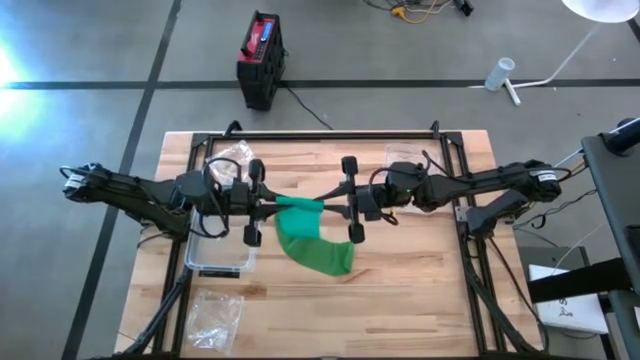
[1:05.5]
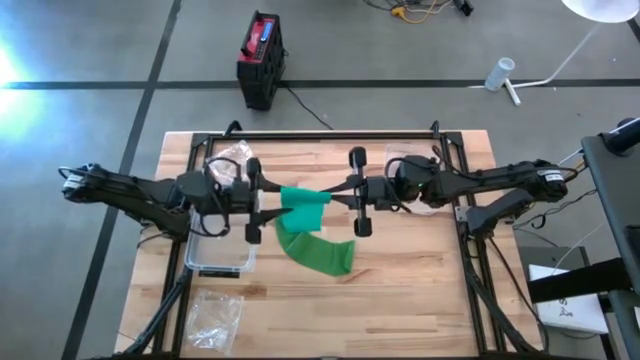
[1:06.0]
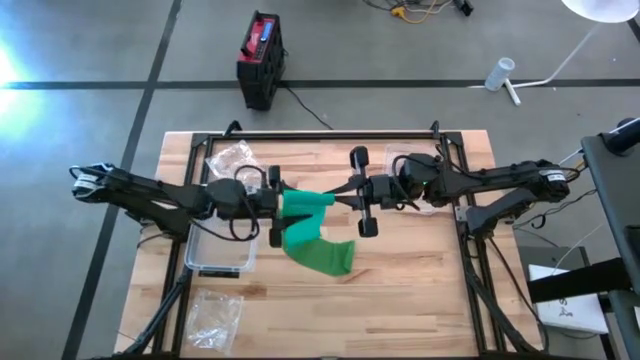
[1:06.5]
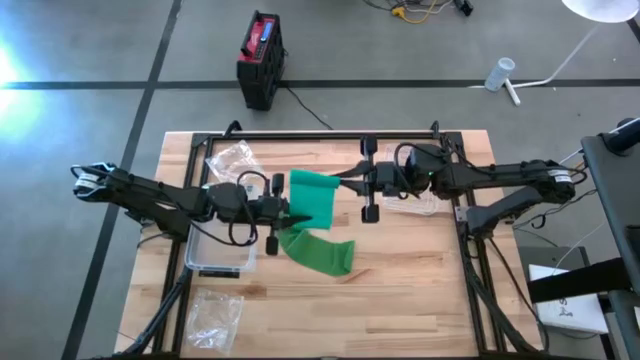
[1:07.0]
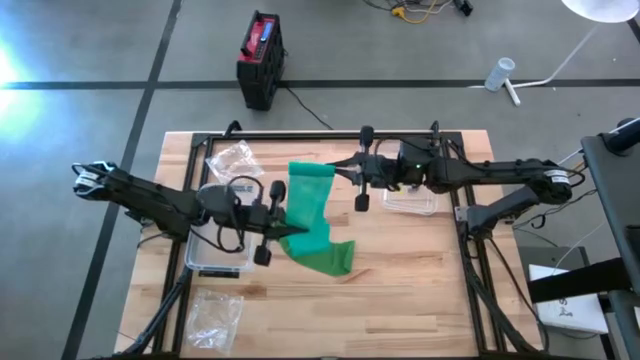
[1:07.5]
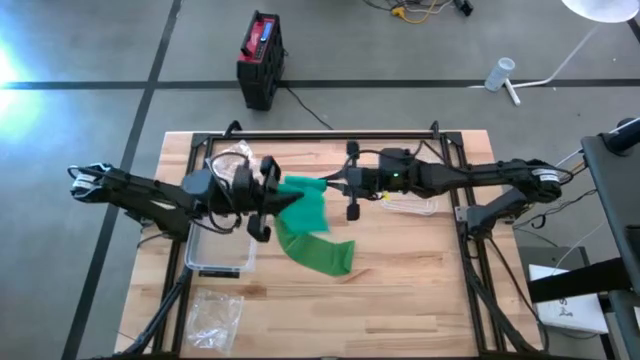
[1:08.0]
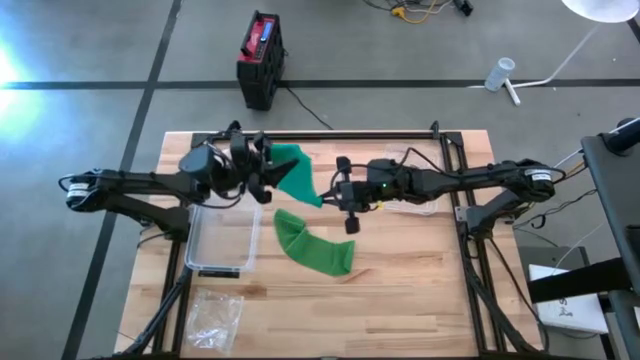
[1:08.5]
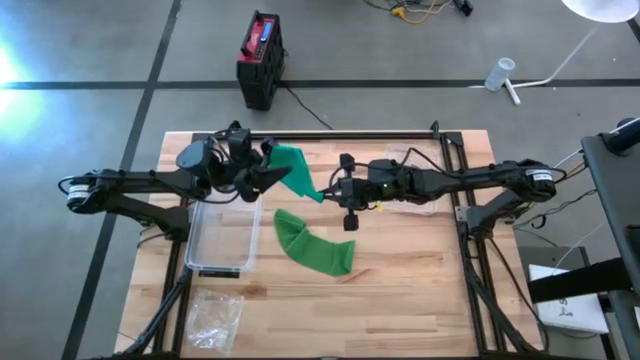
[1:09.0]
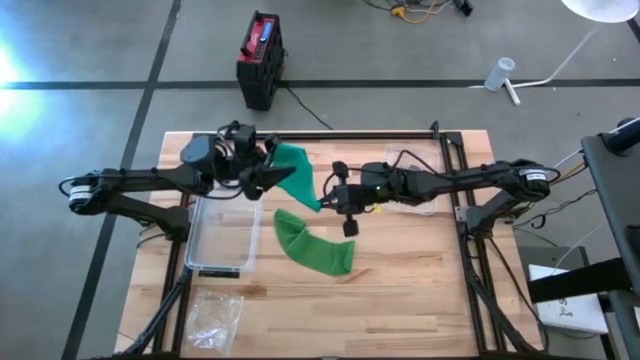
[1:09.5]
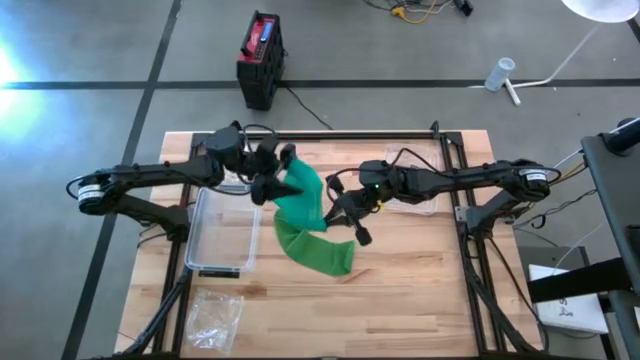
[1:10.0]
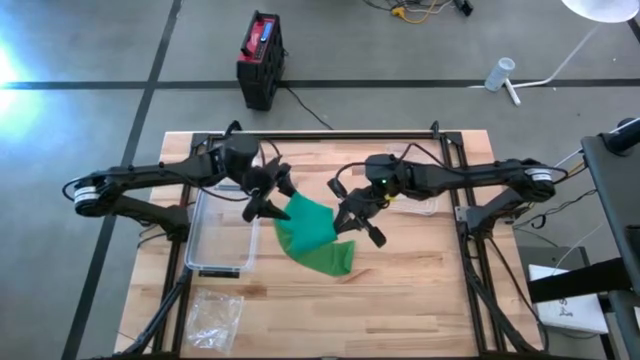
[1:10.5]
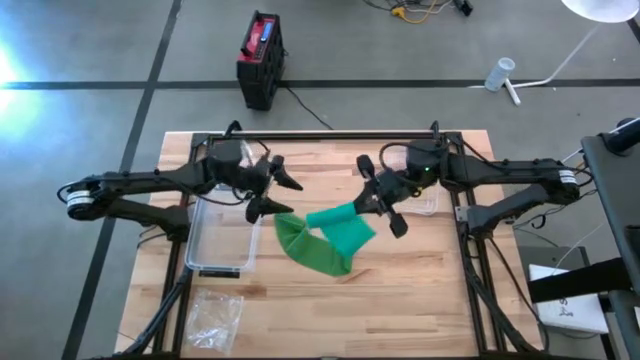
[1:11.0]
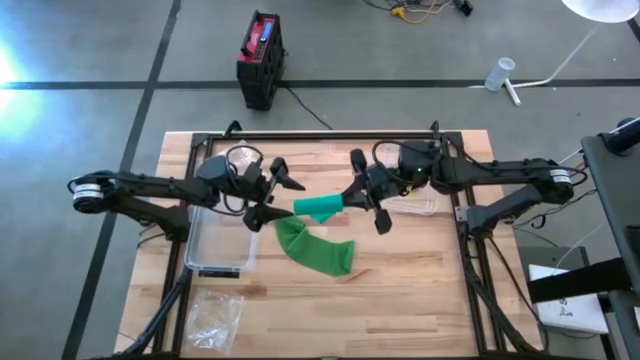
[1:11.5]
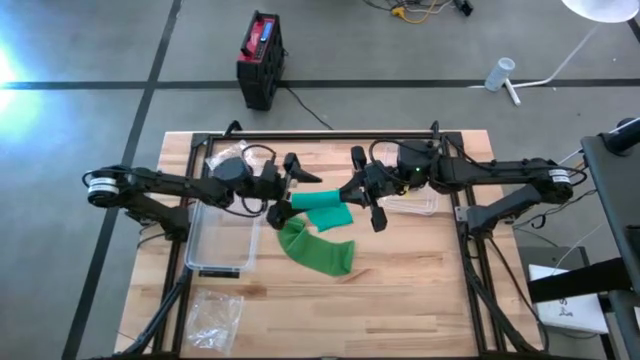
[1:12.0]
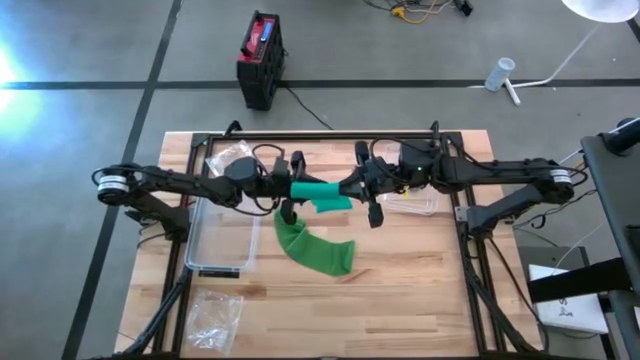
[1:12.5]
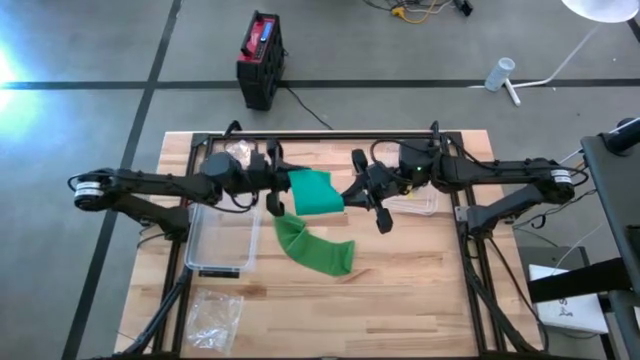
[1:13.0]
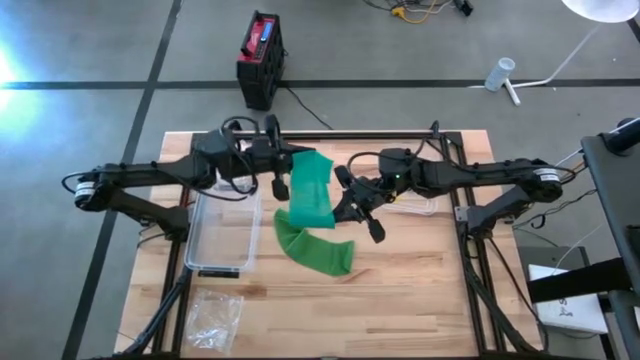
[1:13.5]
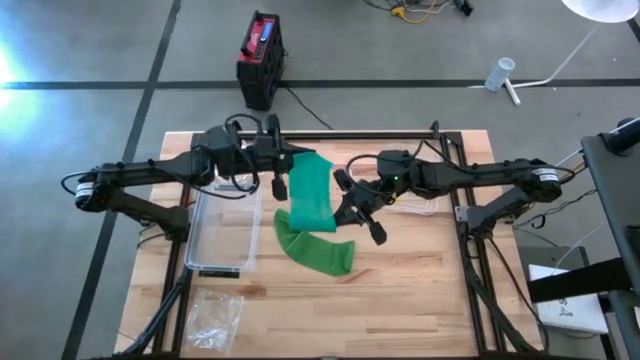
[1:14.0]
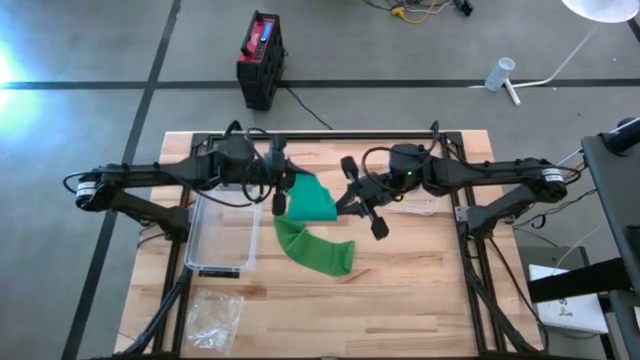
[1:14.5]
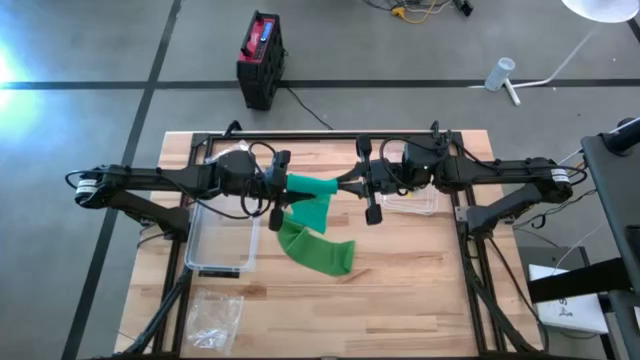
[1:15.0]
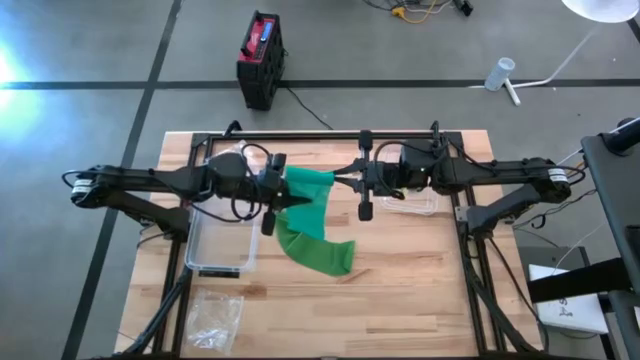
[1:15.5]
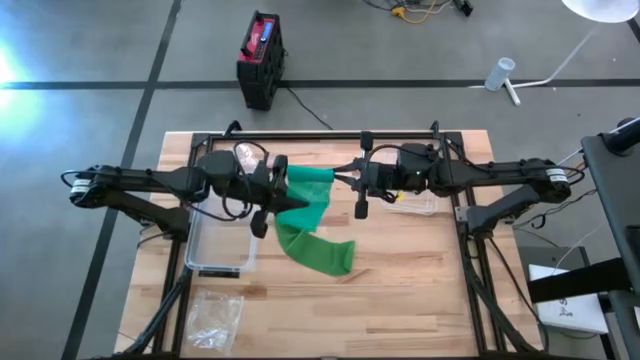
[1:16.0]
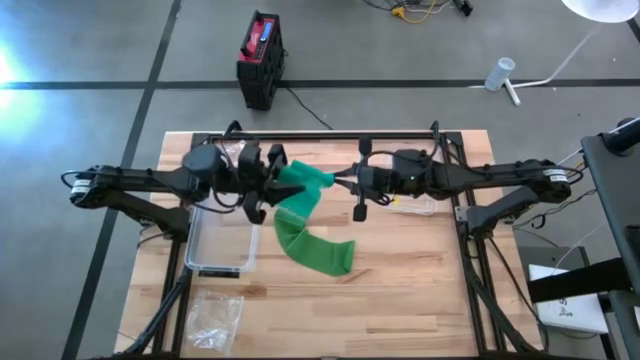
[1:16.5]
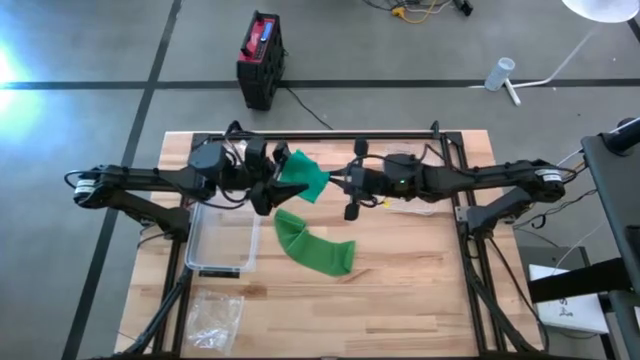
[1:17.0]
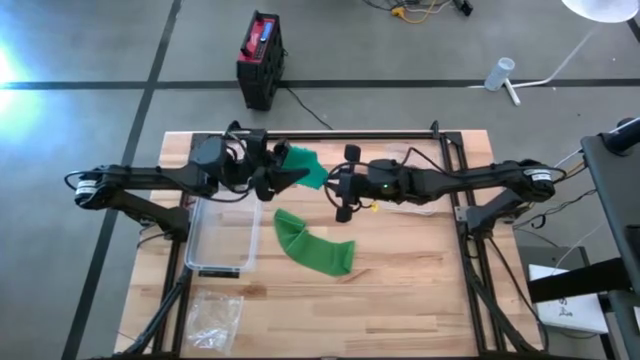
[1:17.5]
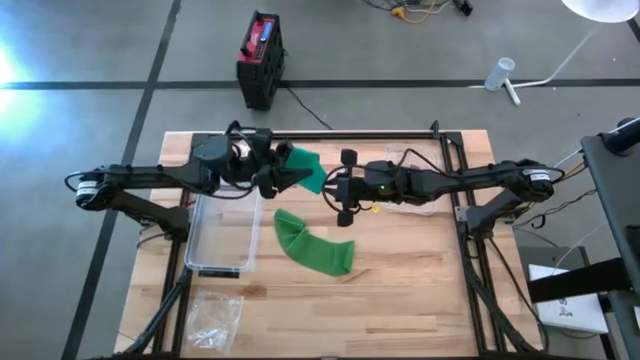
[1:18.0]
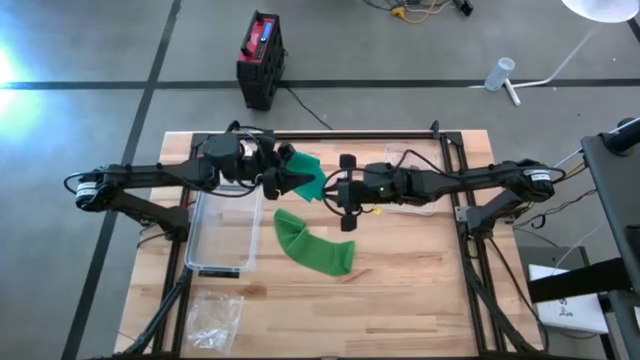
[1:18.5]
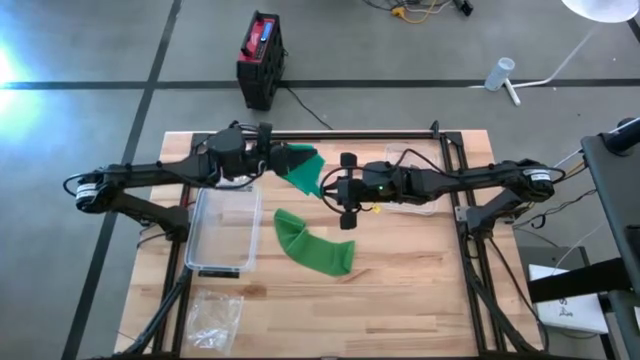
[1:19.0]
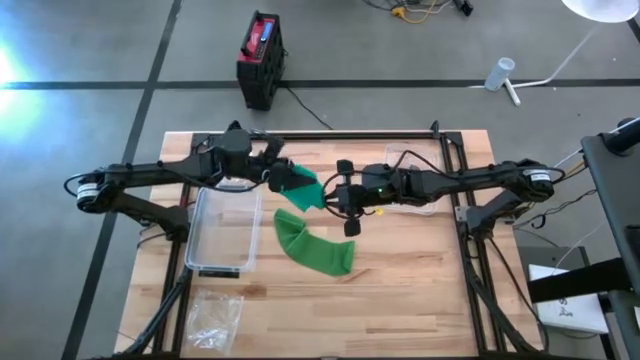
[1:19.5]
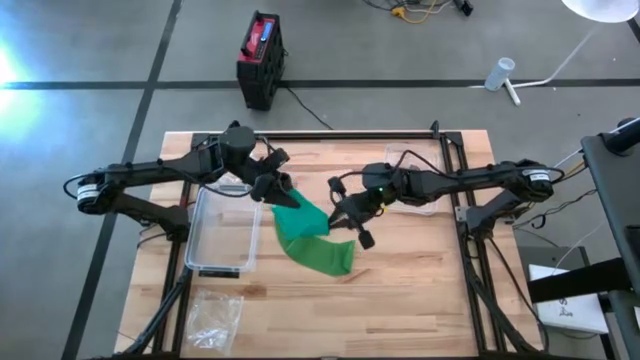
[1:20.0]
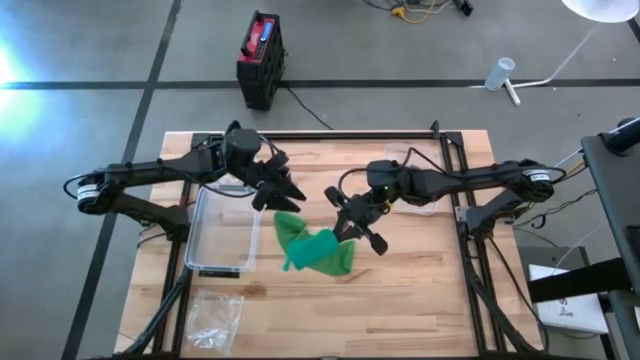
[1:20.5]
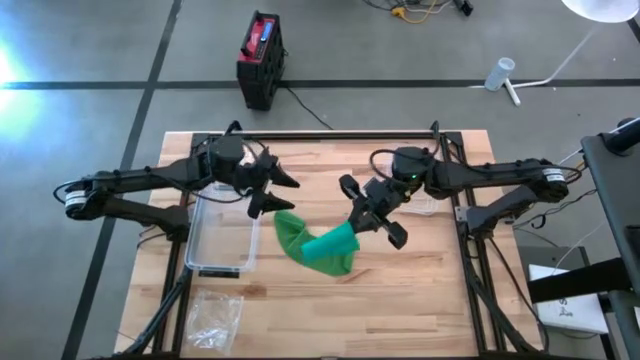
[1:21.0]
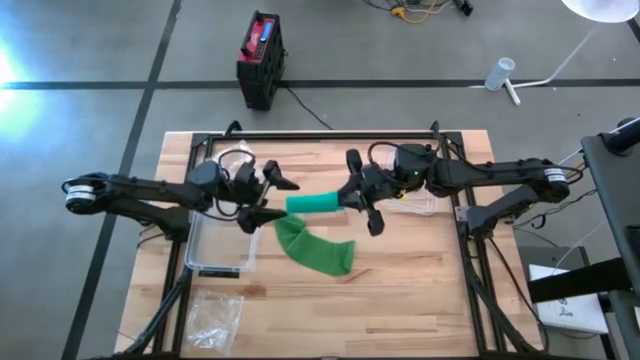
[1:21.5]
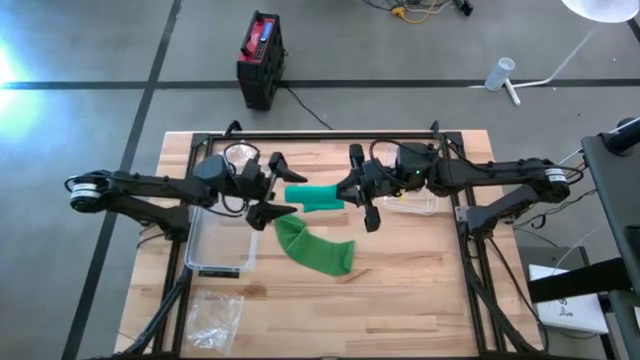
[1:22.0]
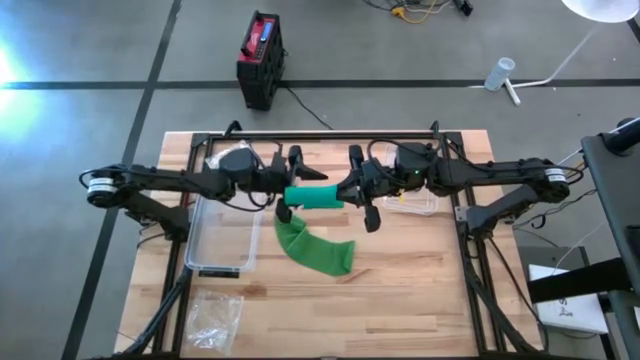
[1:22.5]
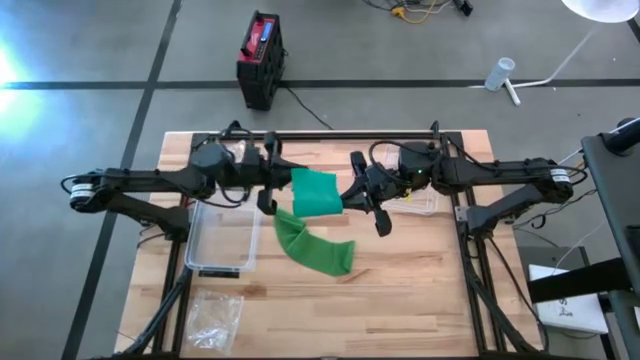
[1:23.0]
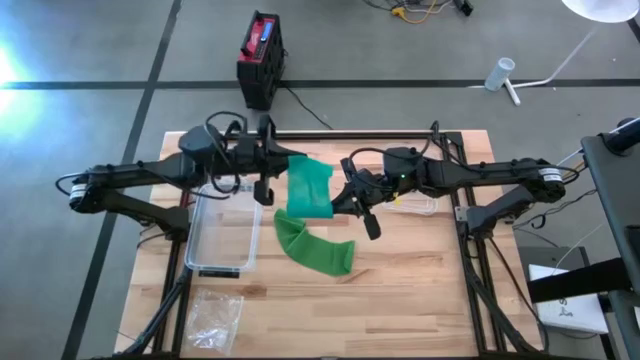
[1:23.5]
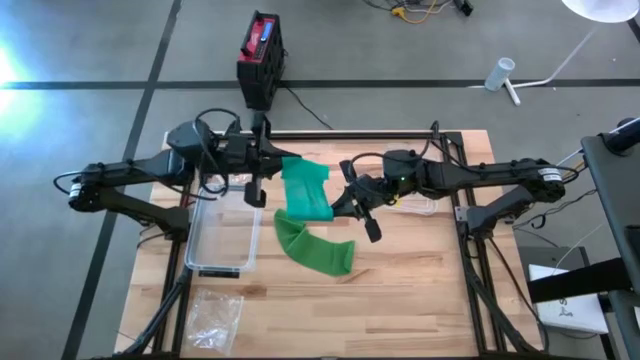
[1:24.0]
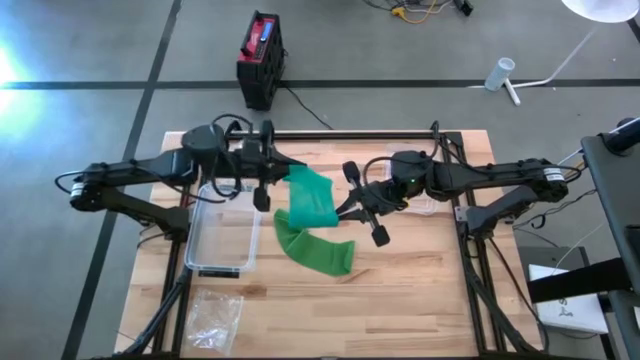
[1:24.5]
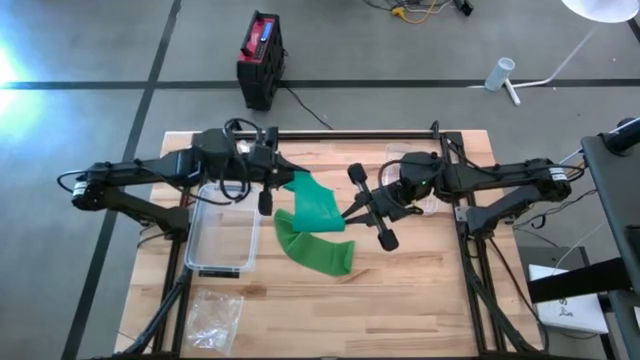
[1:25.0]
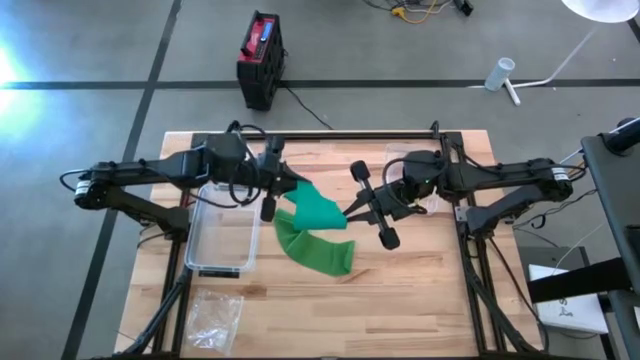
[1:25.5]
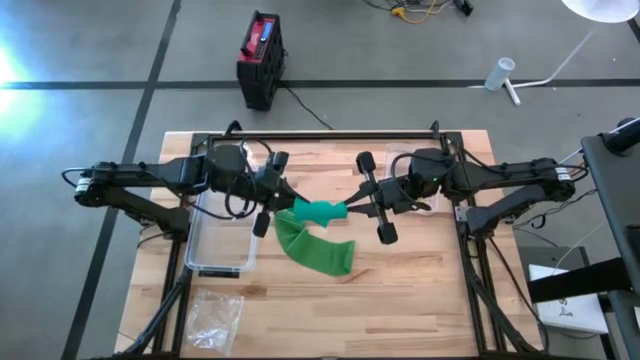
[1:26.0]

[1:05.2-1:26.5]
Task: Roll bandage
Roll the light green bandage
